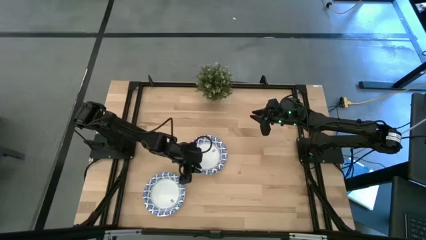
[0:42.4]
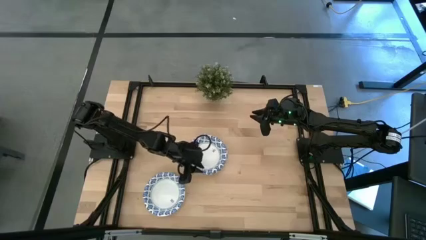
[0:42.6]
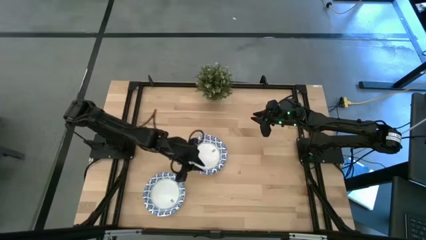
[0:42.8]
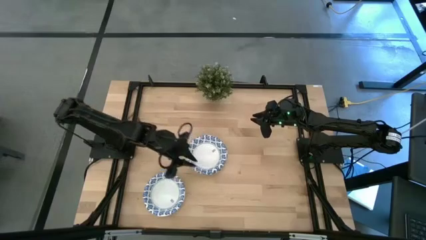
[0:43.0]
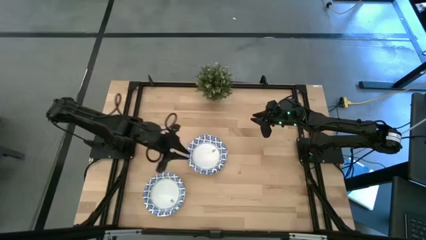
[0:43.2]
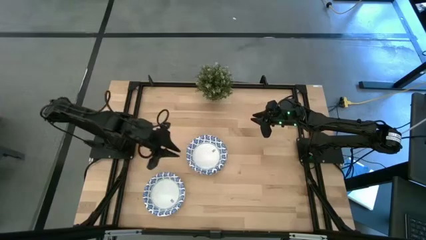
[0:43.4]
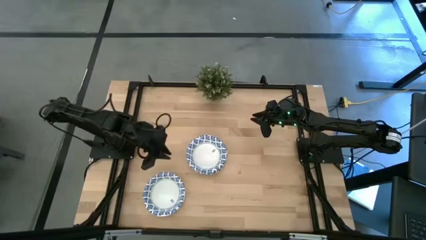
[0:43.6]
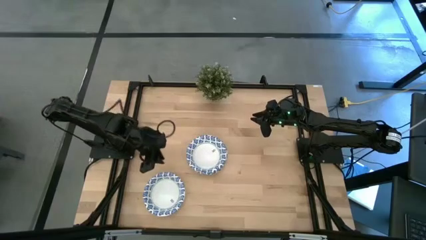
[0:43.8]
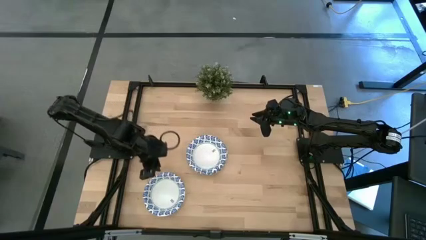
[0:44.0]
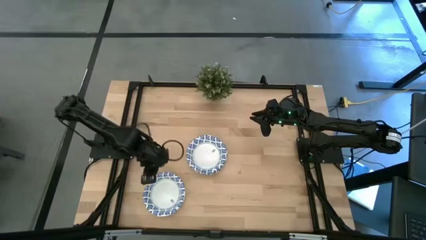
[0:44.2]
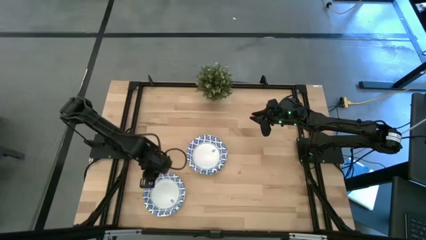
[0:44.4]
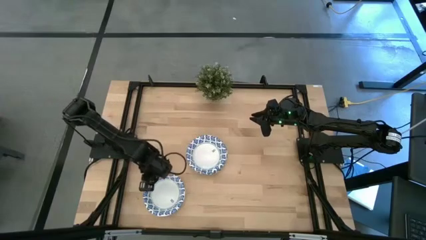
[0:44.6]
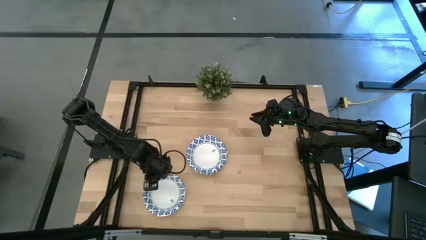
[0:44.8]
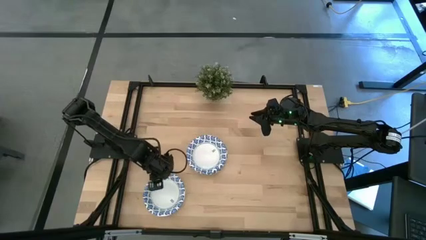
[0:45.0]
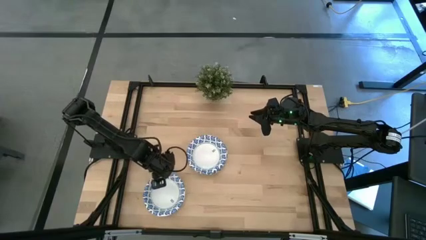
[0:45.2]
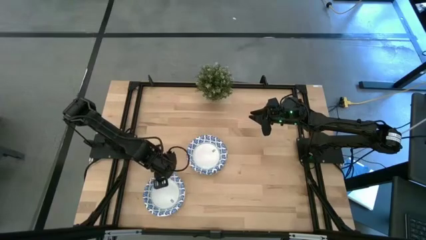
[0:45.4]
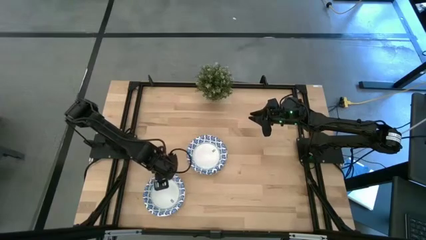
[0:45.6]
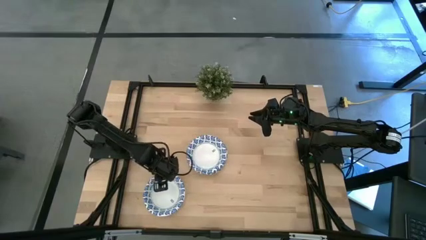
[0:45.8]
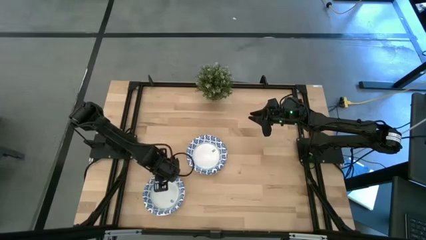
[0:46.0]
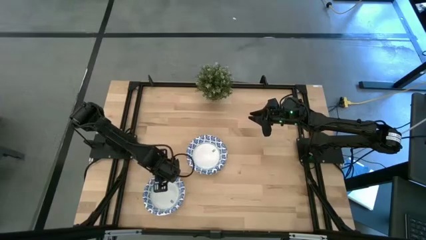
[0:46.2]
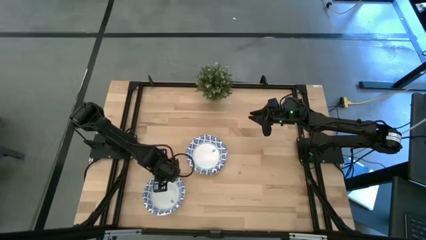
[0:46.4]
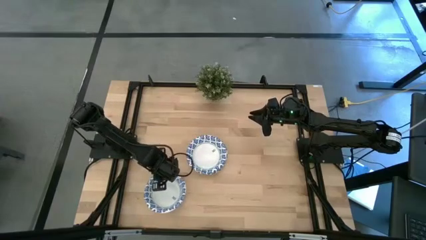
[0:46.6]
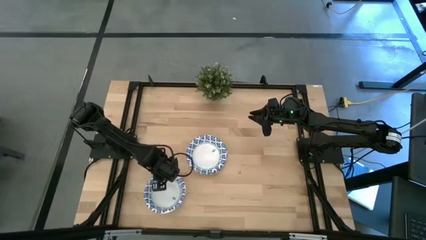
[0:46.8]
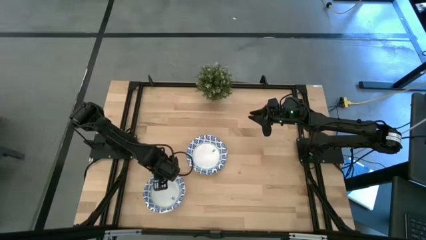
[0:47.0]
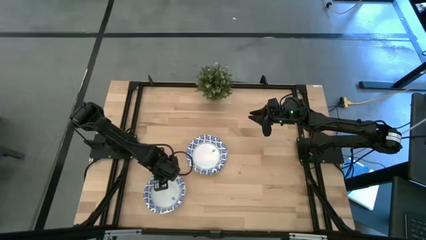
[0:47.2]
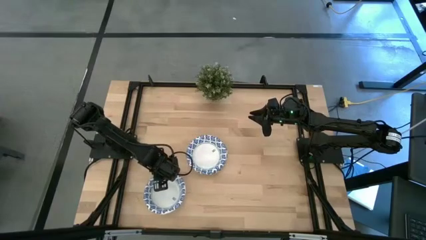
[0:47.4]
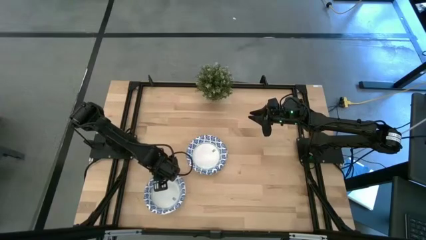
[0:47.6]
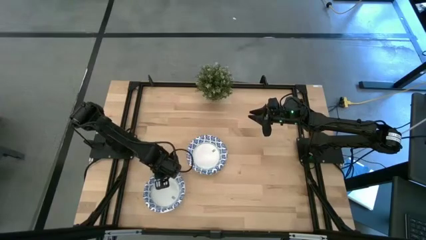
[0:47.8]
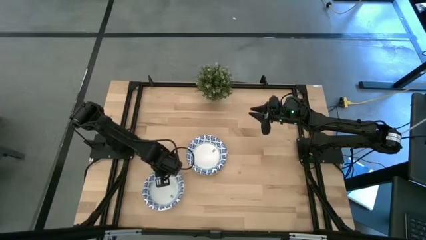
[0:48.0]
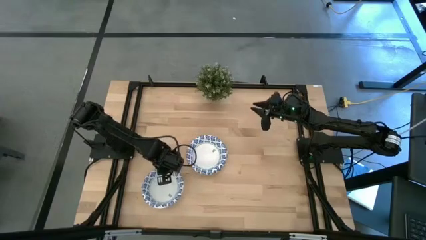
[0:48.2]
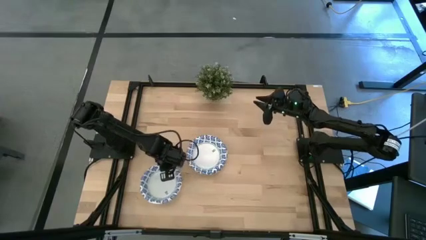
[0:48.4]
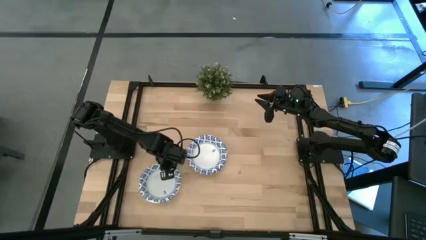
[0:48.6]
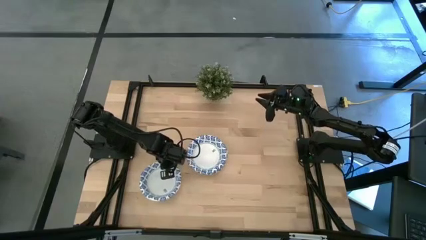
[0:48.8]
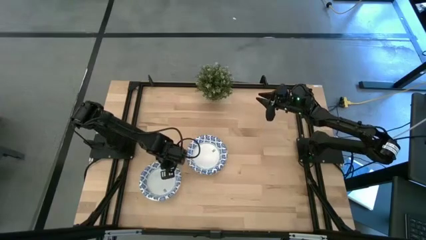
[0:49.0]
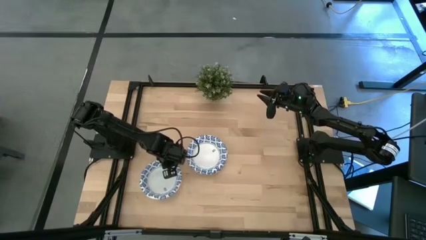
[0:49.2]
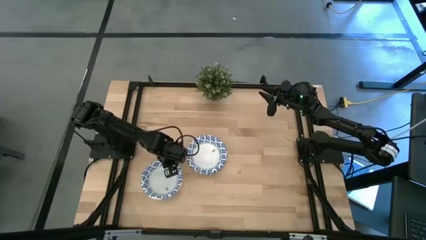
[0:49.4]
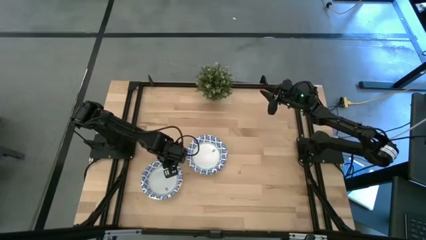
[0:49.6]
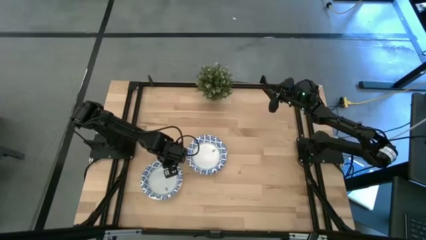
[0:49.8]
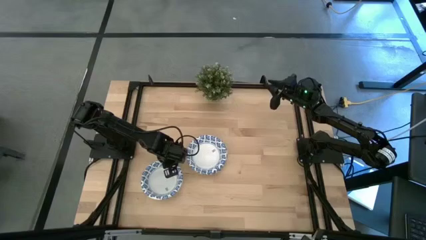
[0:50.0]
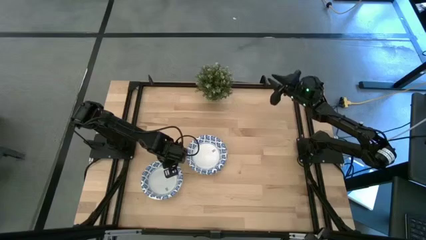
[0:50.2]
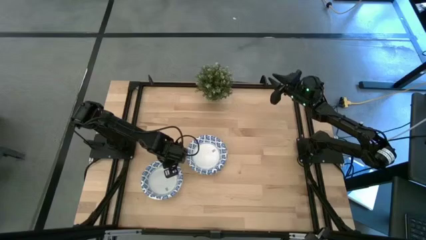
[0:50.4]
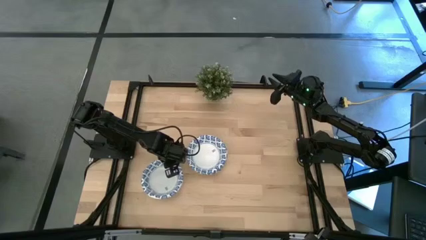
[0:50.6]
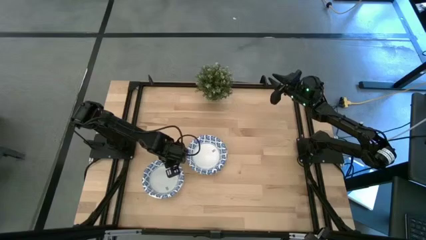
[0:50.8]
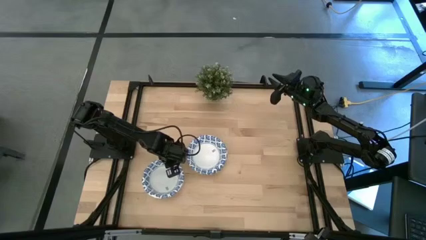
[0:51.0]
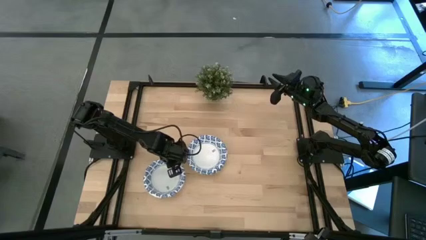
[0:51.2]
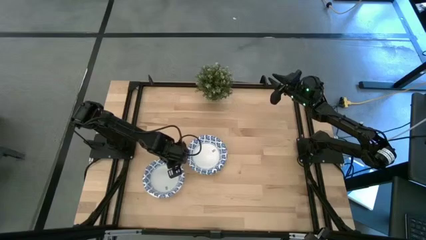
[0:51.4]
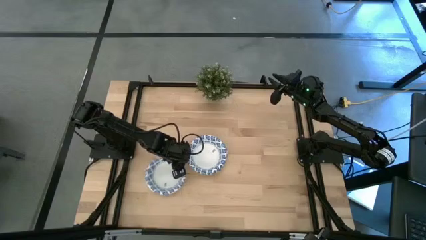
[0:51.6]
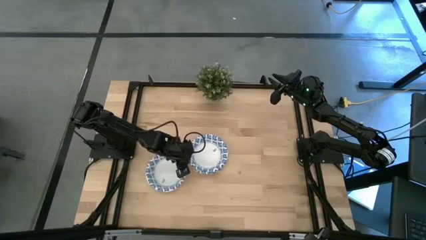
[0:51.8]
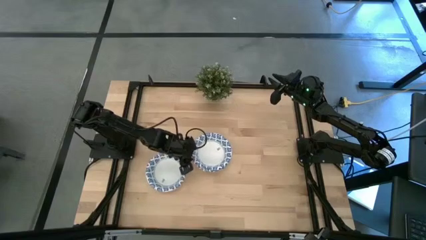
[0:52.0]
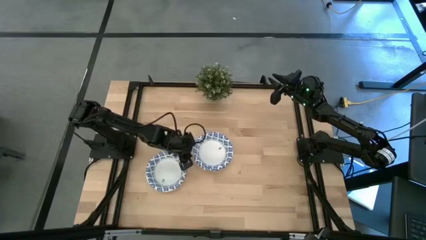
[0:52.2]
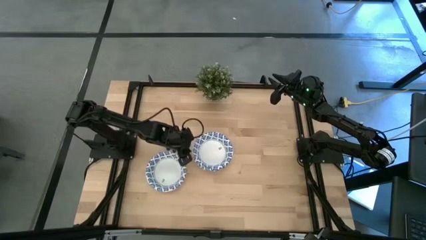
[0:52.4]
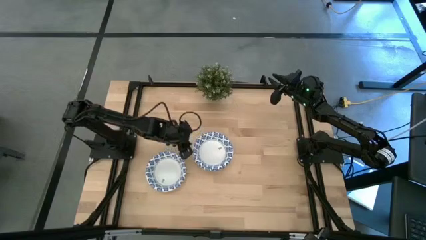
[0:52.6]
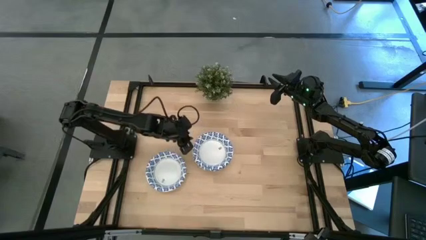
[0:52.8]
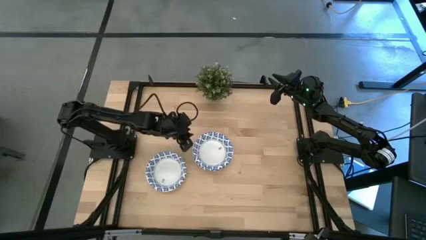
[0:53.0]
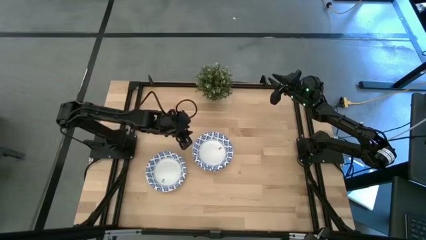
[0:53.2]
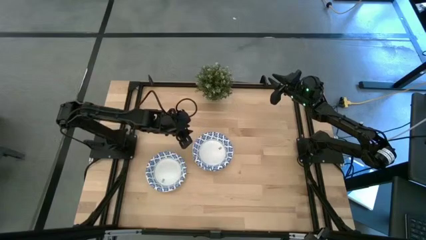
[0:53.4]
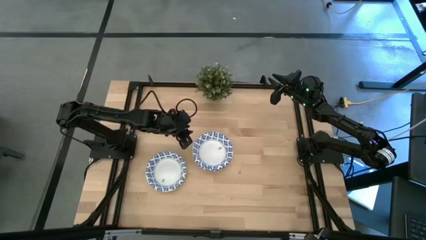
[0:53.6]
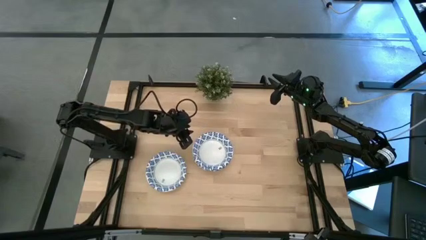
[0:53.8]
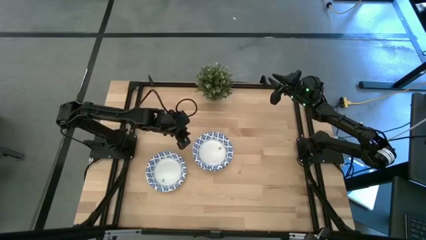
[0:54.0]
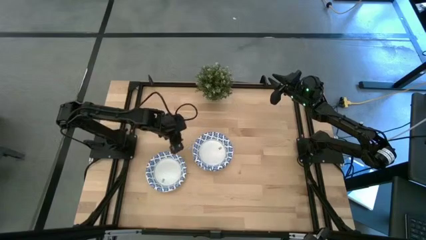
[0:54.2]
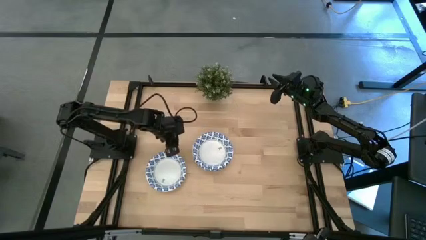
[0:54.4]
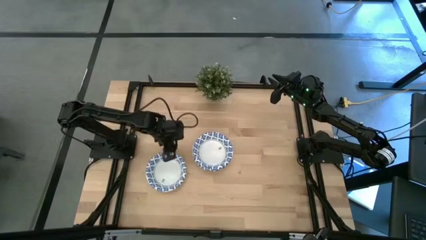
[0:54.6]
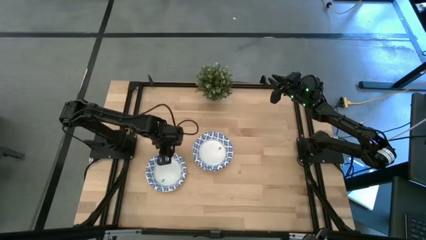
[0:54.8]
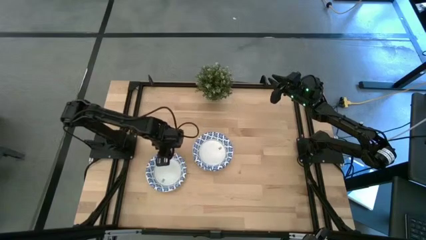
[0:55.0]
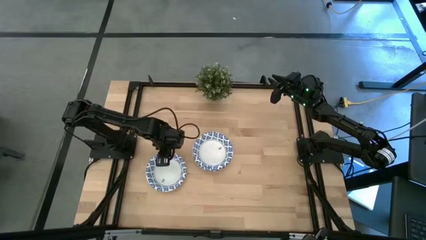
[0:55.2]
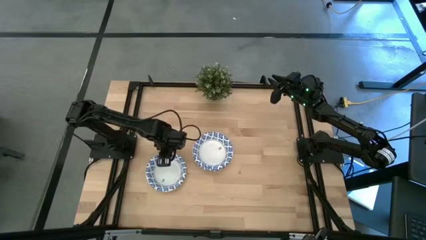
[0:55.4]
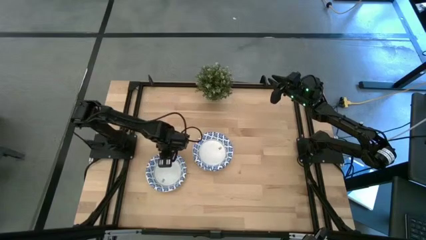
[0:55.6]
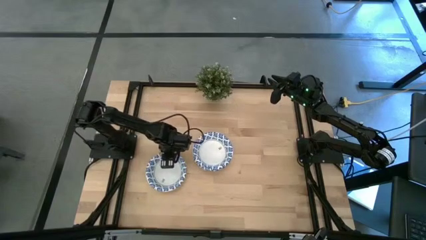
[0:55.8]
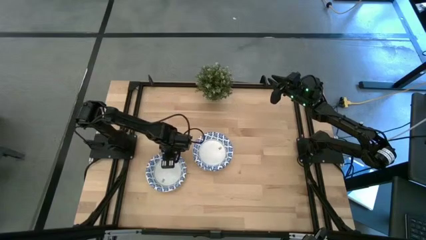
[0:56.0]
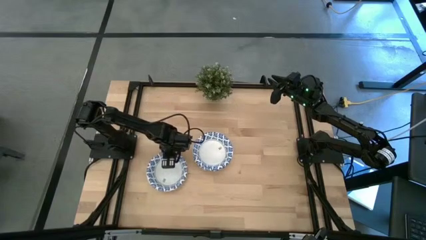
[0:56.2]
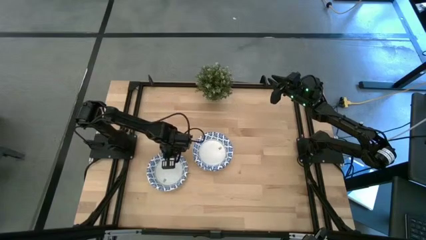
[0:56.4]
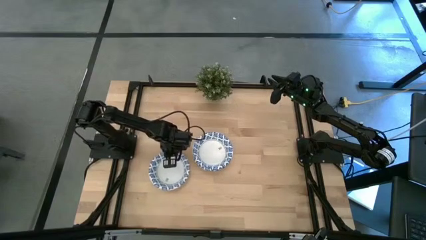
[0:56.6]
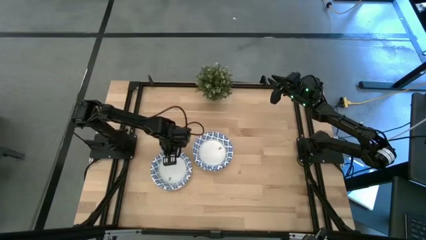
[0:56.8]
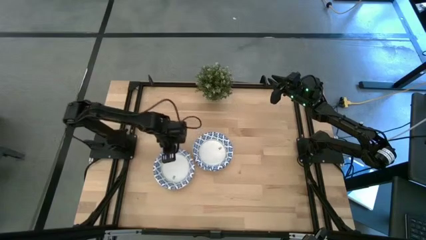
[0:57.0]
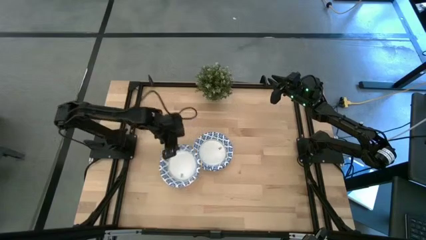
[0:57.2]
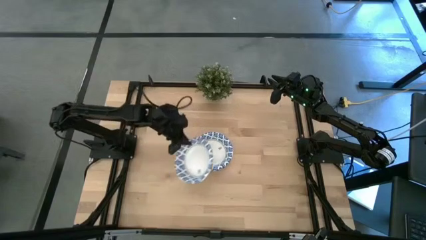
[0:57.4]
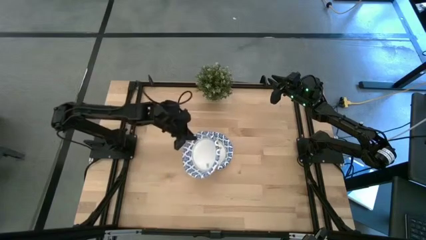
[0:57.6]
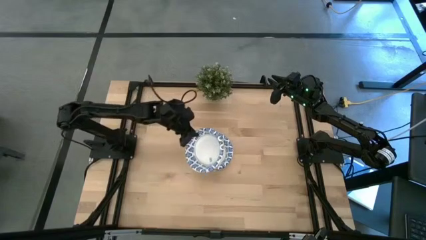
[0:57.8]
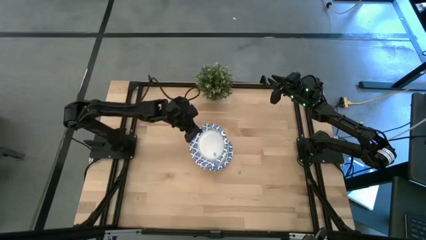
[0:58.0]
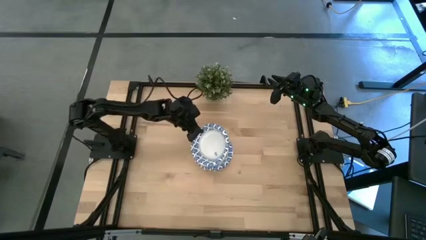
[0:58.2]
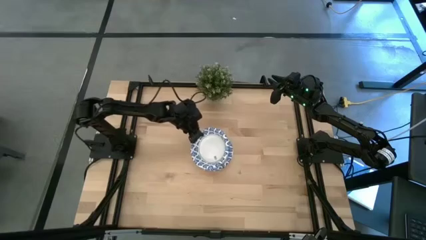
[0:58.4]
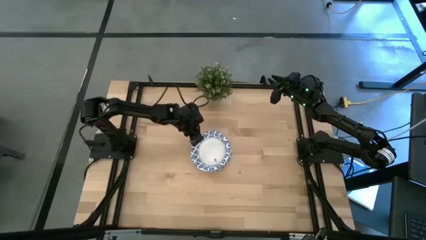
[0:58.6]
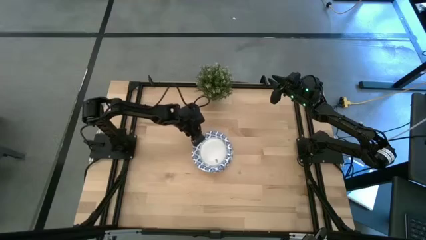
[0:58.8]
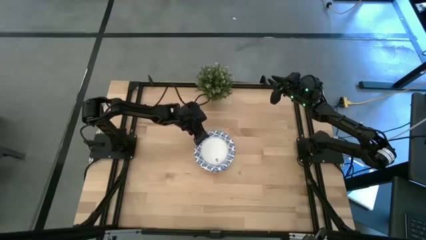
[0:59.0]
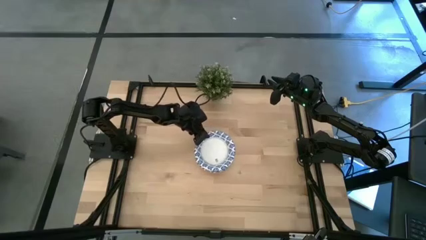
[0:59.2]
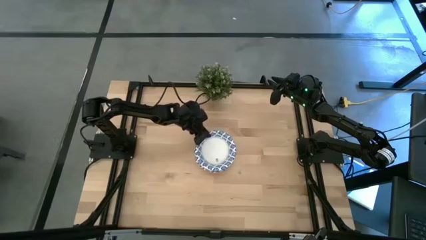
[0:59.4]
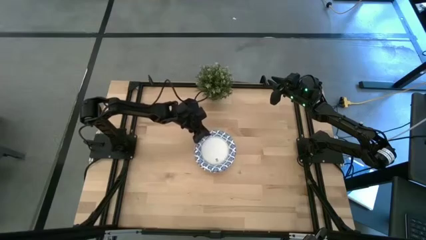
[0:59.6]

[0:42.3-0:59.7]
Task: Nest bowls inside each other
Stack the white bowl on the stacked white bowls
